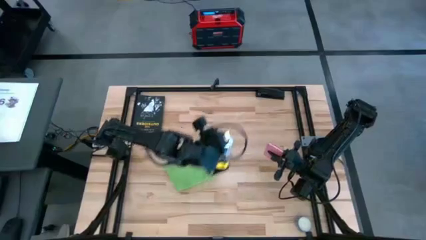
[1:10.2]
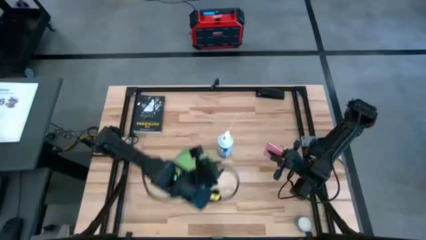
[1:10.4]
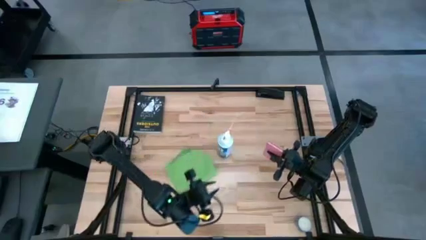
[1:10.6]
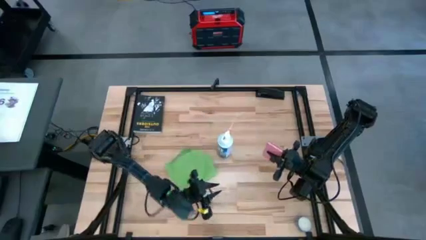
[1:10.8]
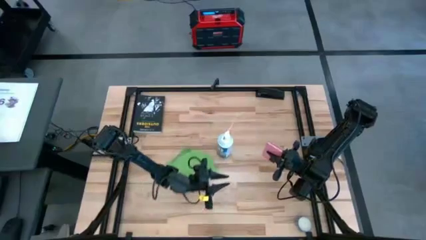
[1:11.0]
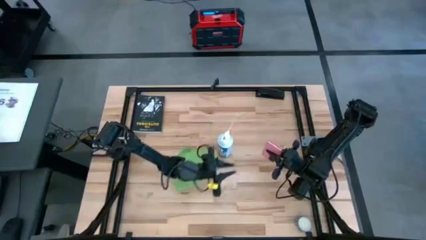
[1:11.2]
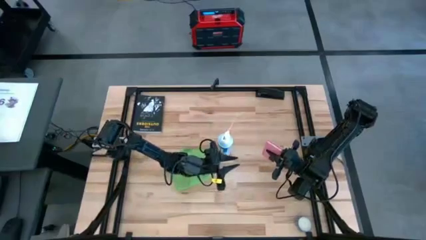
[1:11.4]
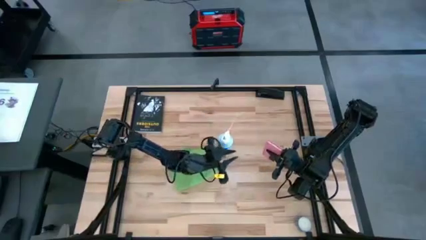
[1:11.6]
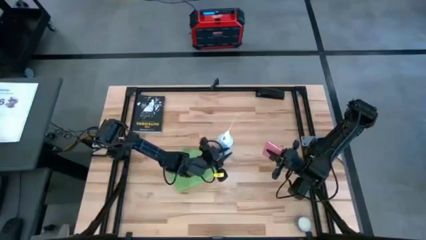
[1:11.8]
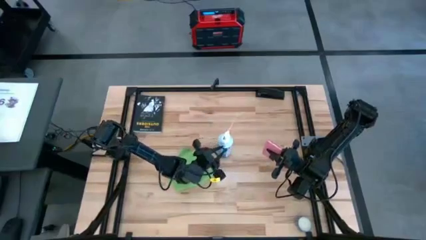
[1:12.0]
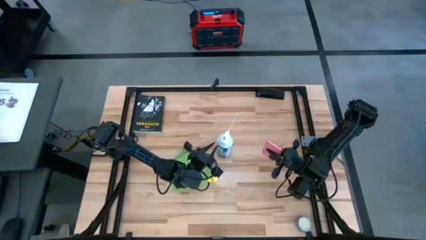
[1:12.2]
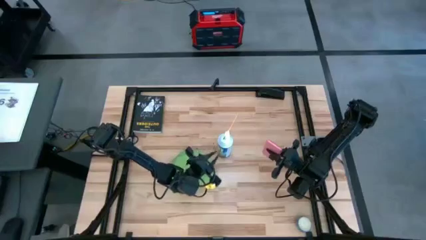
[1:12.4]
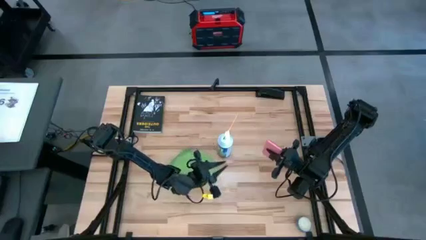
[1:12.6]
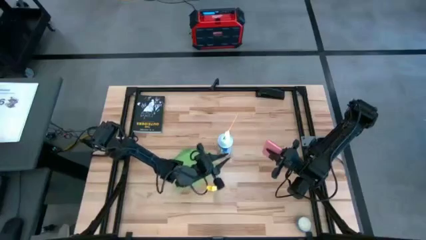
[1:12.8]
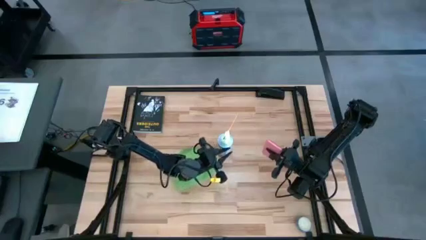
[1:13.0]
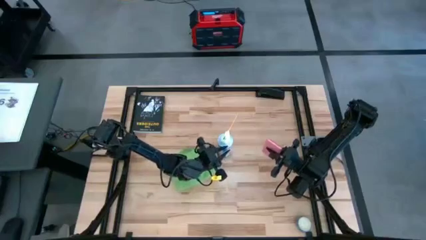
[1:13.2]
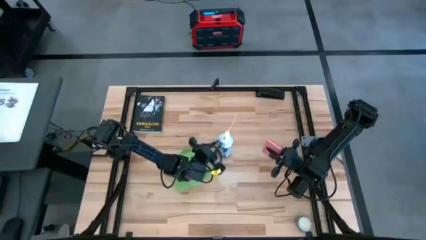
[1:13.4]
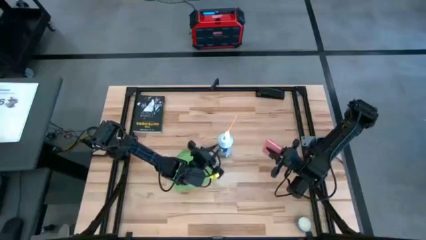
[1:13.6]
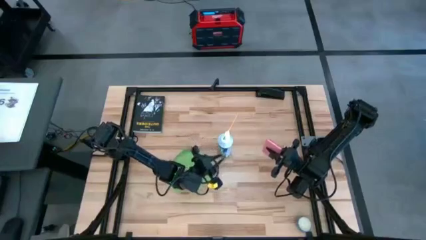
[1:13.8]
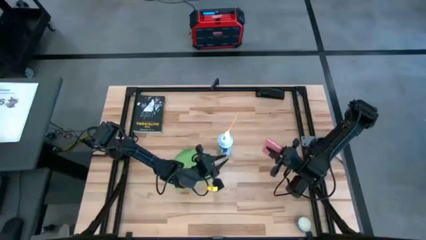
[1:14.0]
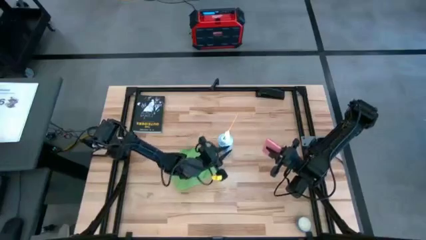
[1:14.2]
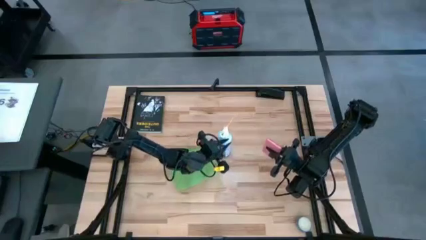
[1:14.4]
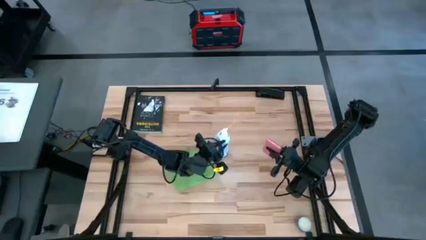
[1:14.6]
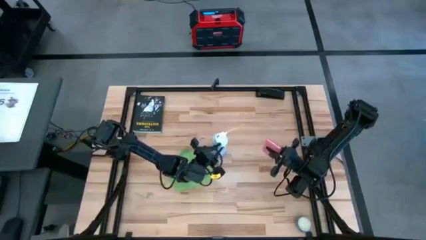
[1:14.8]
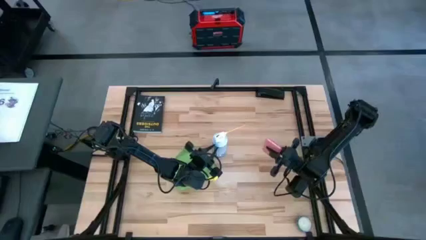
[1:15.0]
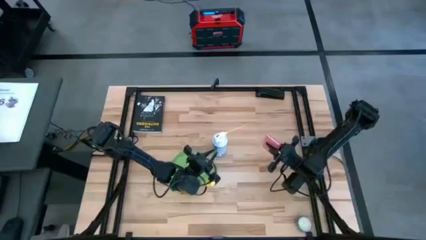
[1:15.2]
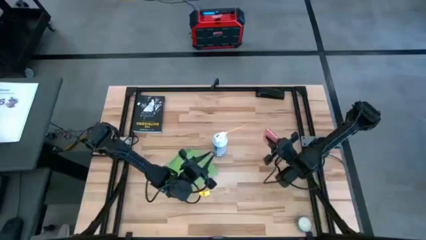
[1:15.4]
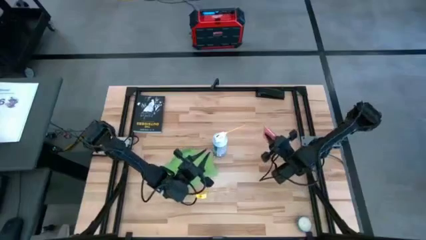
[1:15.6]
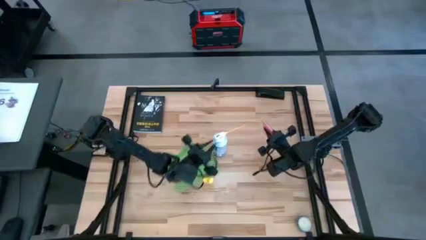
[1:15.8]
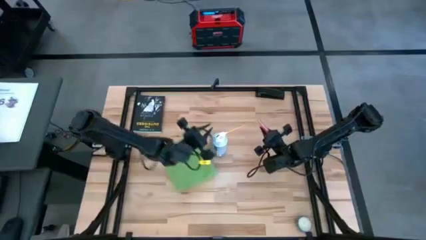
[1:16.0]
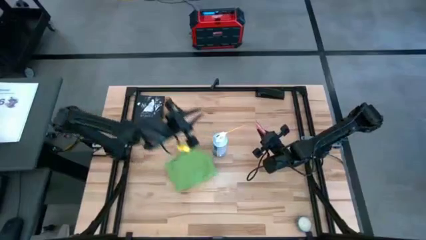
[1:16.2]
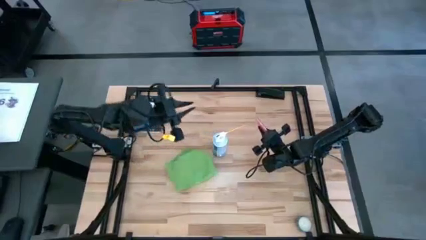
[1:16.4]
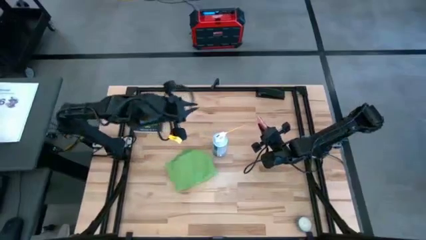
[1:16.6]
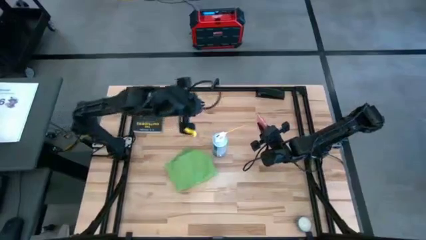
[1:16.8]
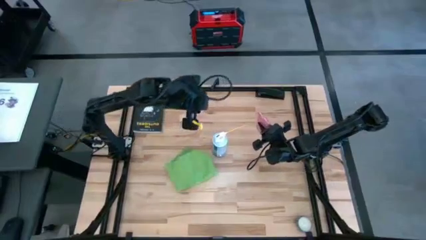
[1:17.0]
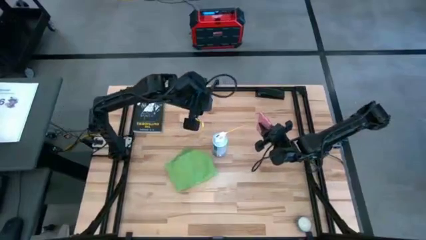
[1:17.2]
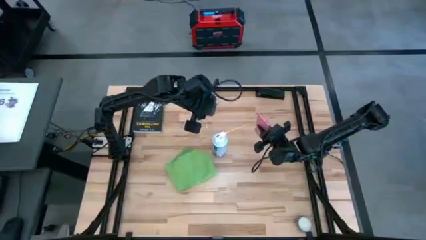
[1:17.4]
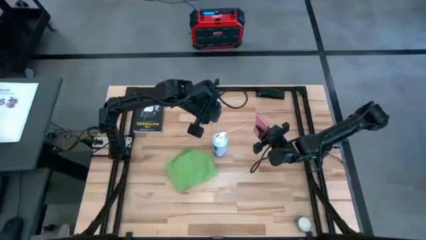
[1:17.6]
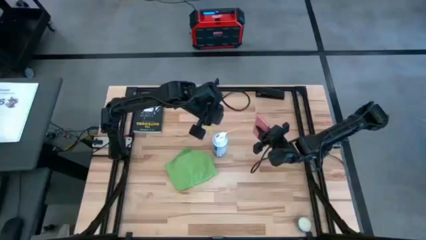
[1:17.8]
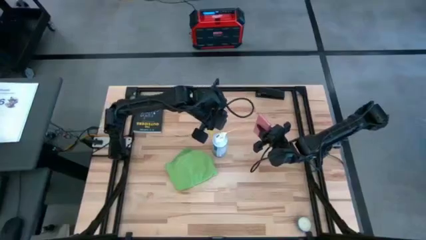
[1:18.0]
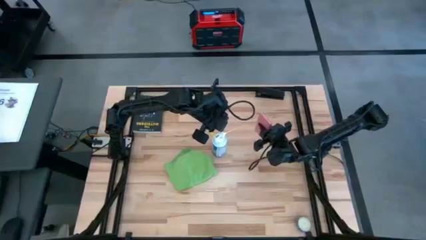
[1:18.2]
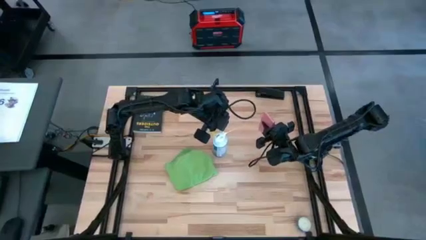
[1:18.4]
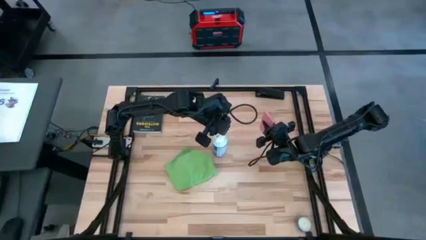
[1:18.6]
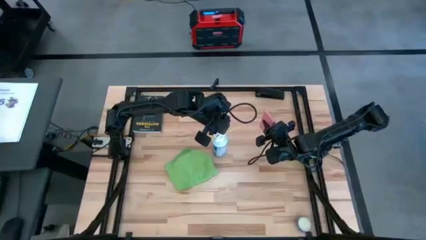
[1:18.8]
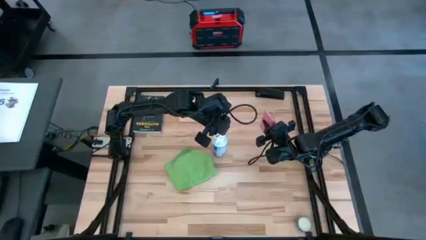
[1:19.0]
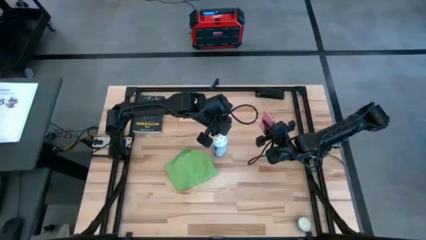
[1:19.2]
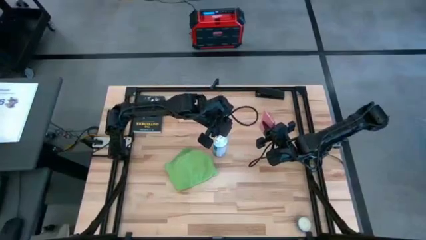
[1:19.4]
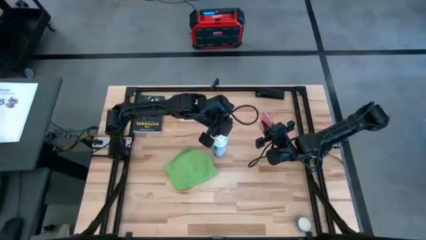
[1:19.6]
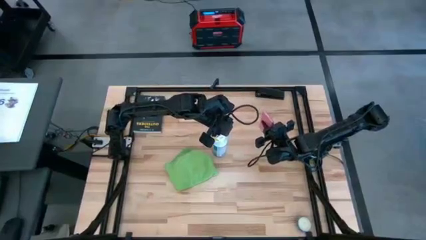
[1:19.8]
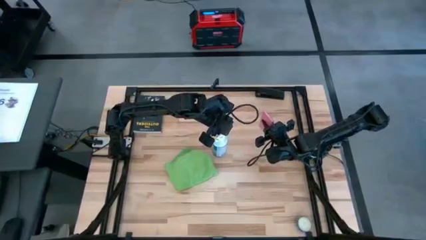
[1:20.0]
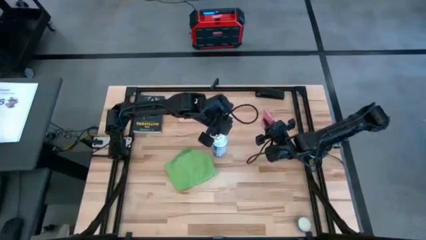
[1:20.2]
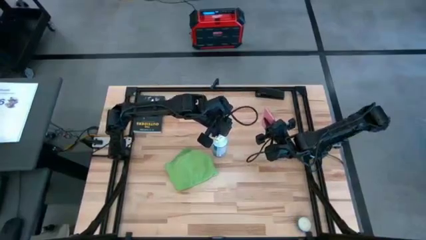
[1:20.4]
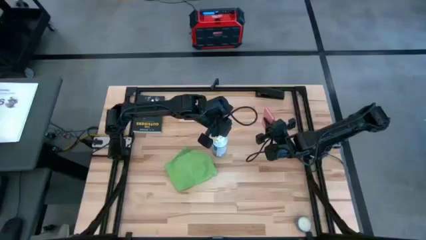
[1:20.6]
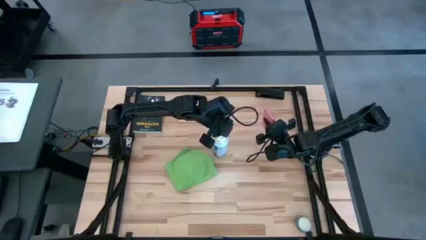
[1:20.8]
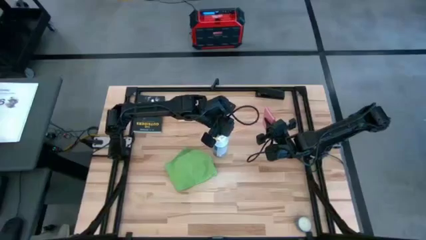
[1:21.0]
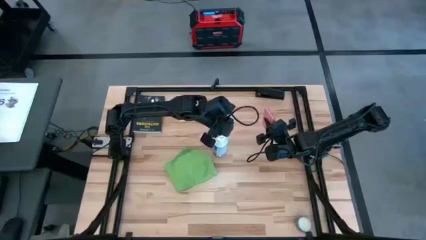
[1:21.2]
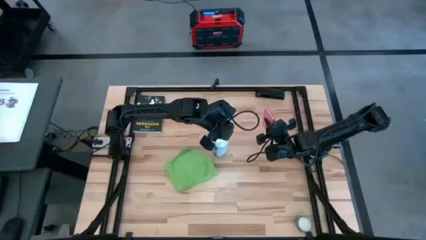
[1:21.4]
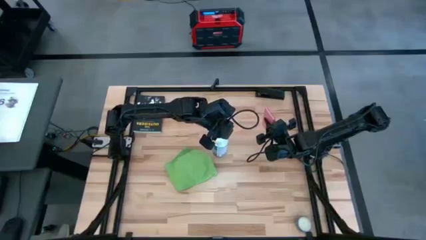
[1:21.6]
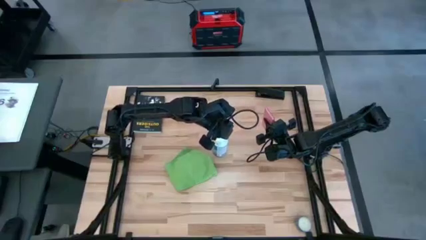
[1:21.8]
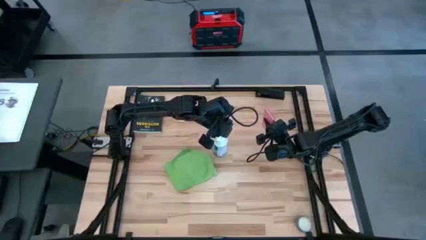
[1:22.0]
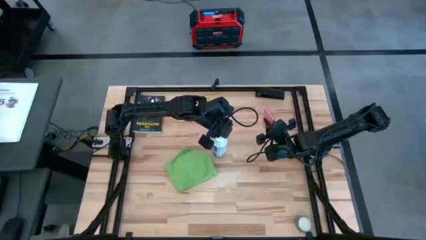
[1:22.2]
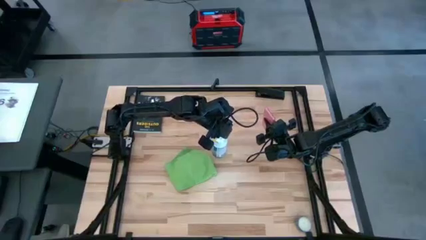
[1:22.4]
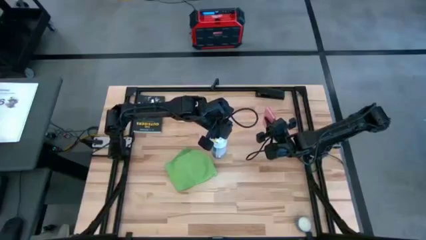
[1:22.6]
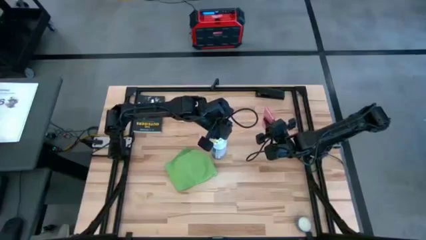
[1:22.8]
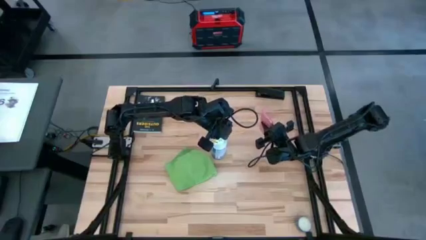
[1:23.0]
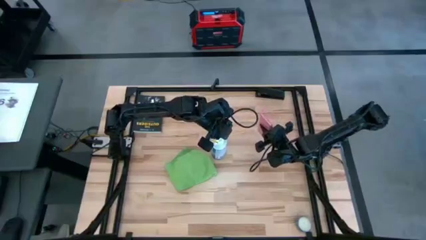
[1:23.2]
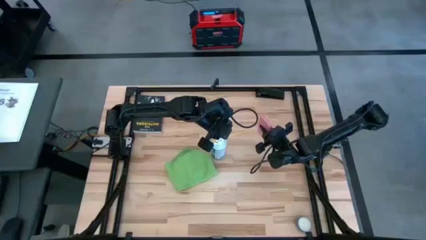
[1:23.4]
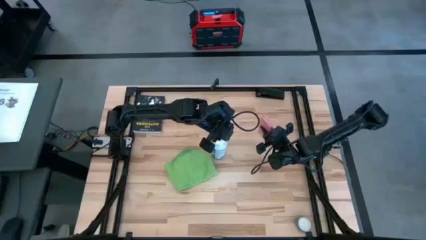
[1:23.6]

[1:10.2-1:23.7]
Task: Apply microfiber cloth
Spray the pink cellphone using the spray bottle

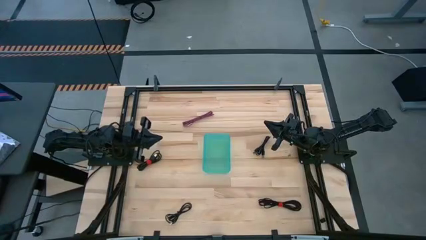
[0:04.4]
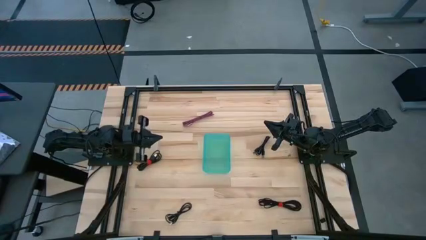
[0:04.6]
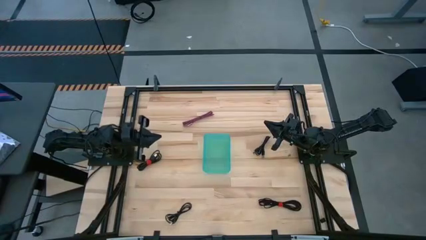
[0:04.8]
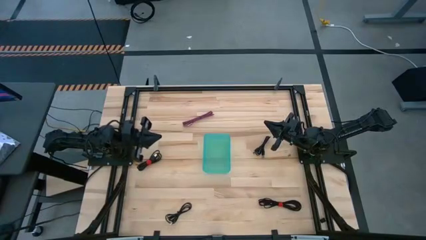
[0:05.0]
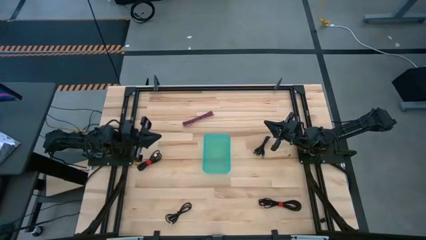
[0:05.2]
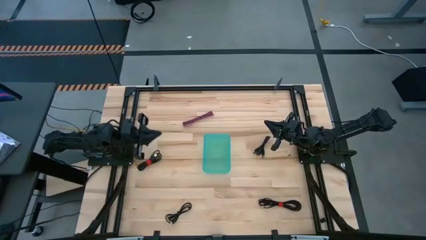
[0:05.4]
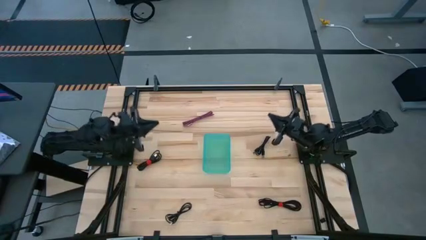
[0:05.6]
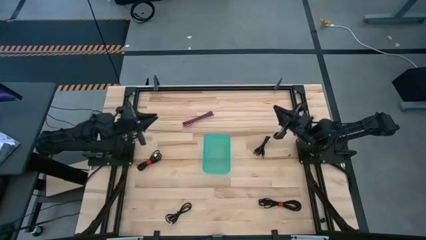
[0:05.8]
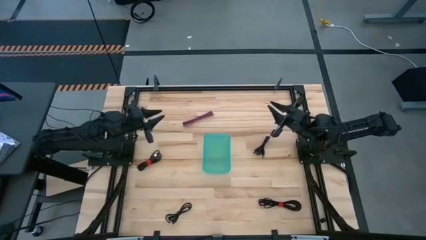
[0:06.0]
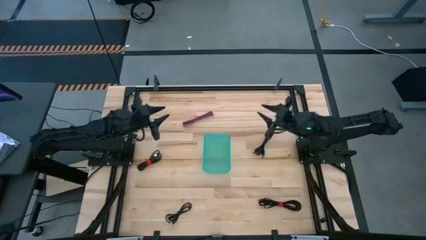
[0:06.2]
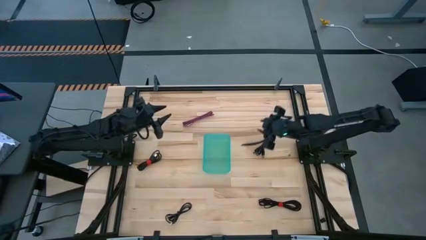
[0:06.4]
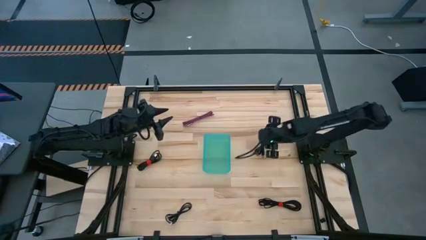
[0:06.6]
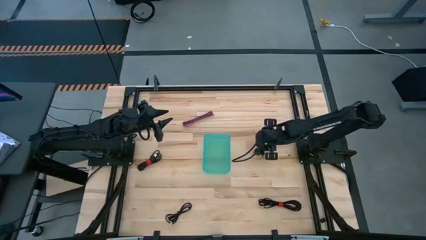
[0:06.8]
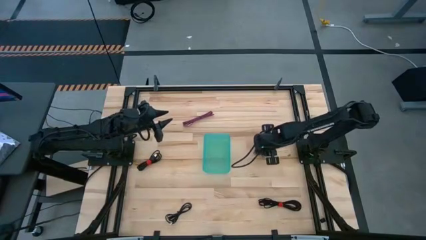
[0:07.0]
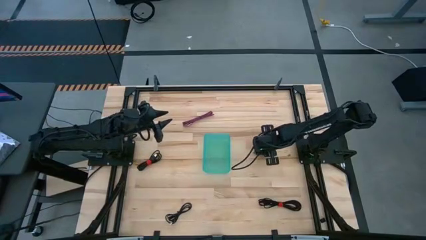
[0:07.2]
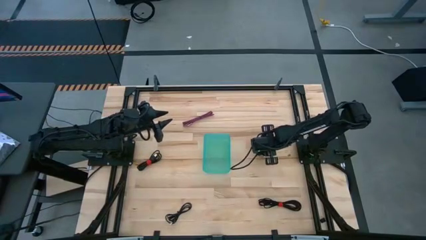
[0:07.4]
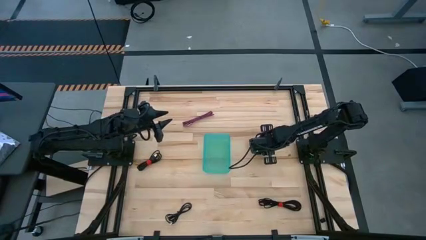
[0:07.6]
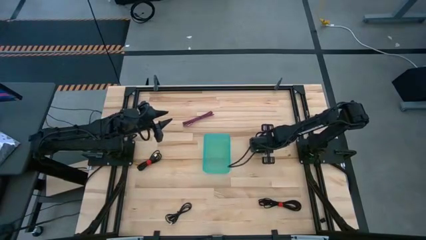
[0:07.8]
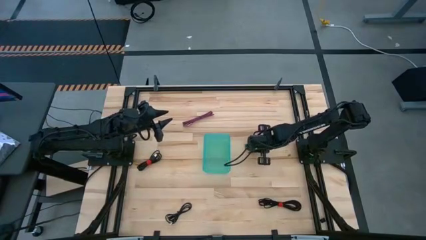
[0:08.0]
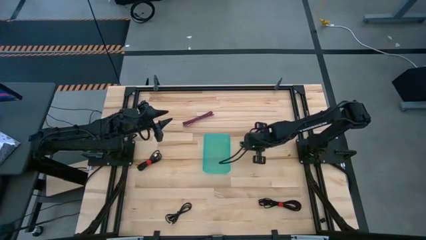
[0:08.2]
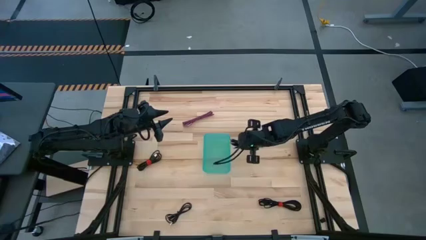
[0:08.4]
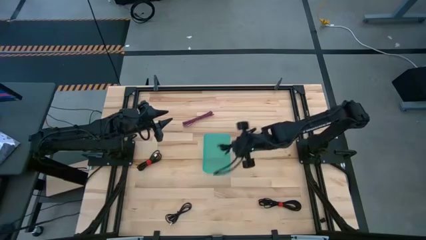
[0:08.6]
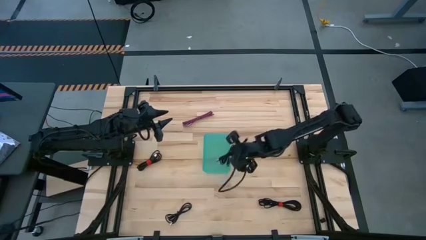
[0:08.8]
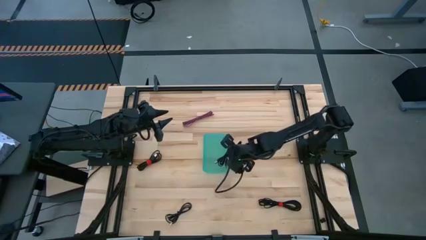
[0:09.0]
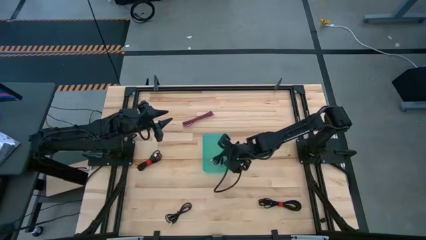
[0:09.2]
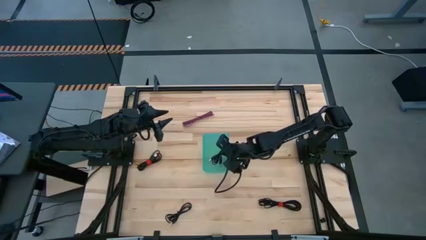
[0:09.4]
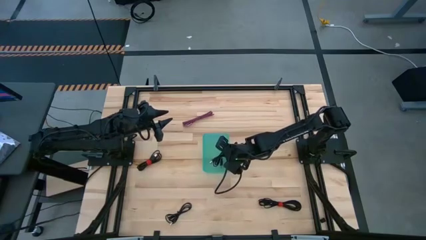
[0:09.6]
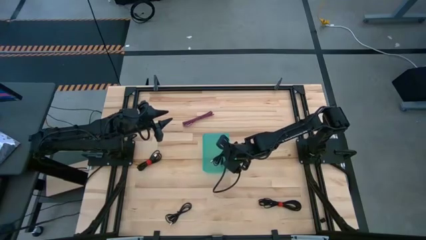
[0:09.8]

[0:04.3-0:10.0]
Task: Pick and place USB-C Cables
Put the black charger cable into the green bin
